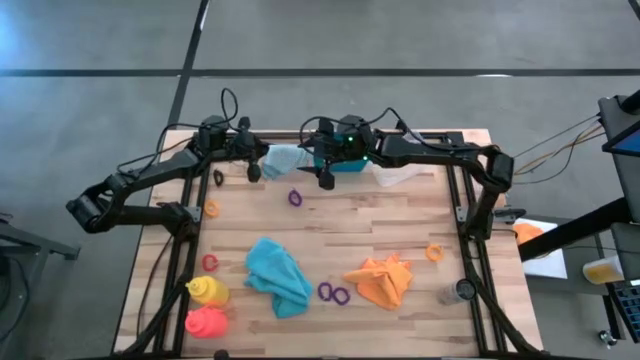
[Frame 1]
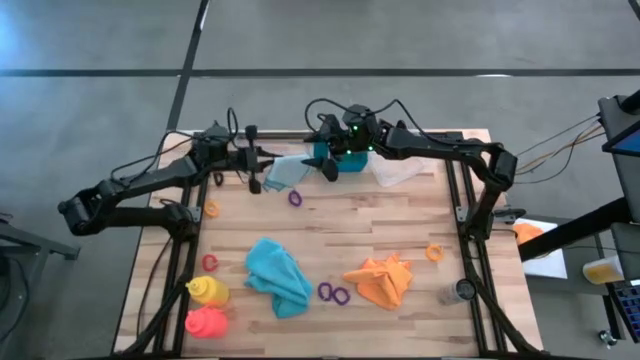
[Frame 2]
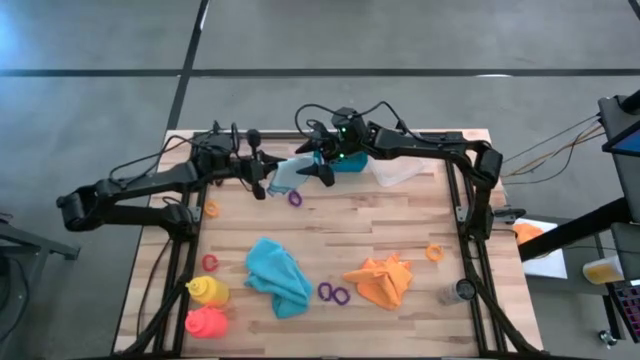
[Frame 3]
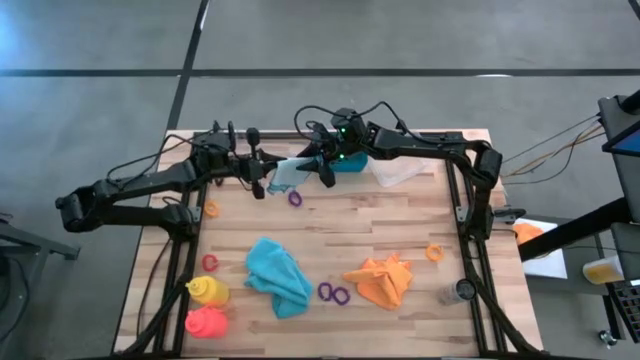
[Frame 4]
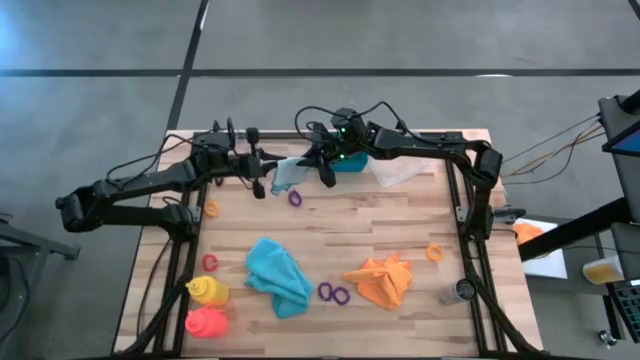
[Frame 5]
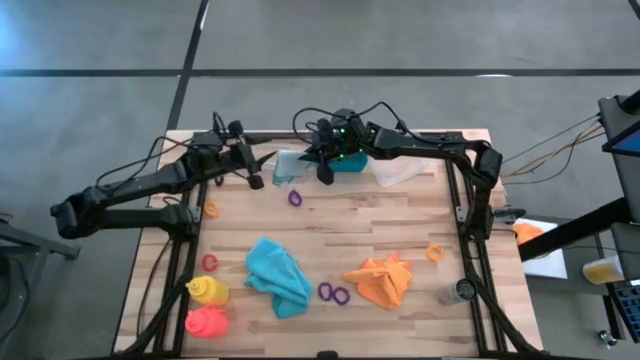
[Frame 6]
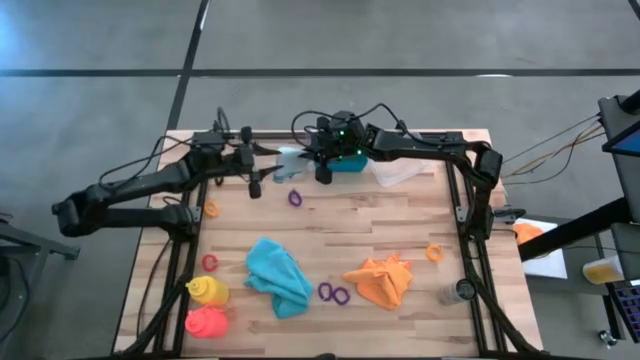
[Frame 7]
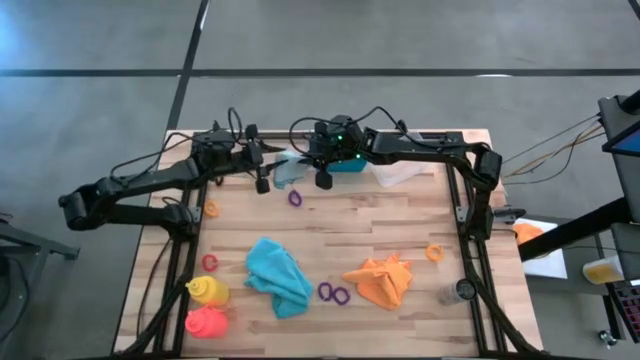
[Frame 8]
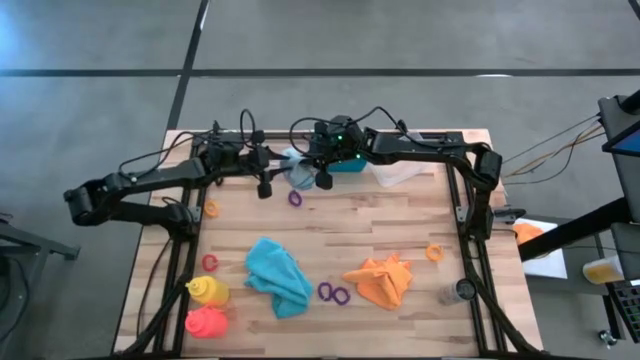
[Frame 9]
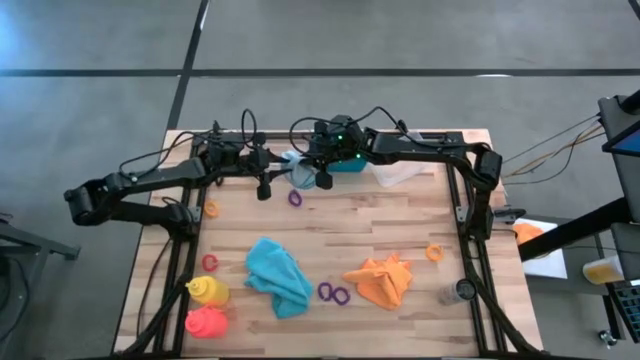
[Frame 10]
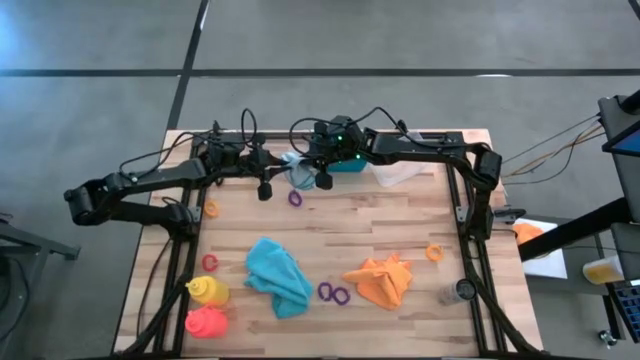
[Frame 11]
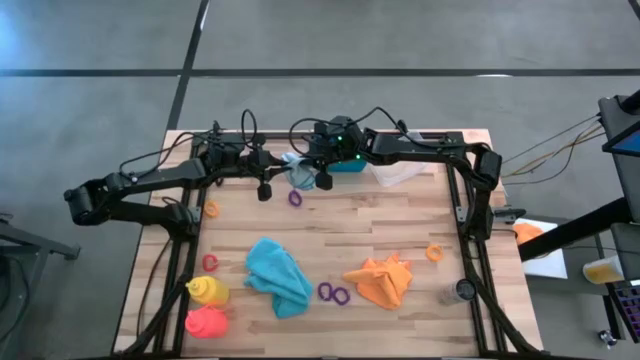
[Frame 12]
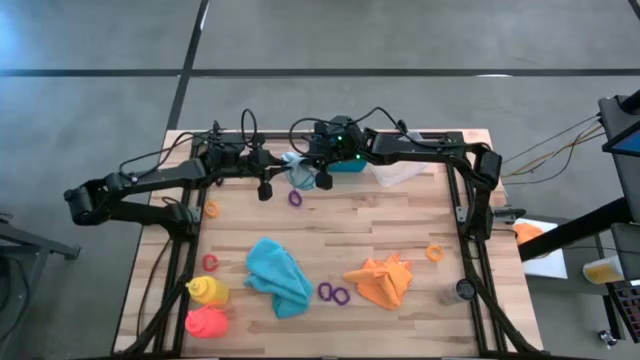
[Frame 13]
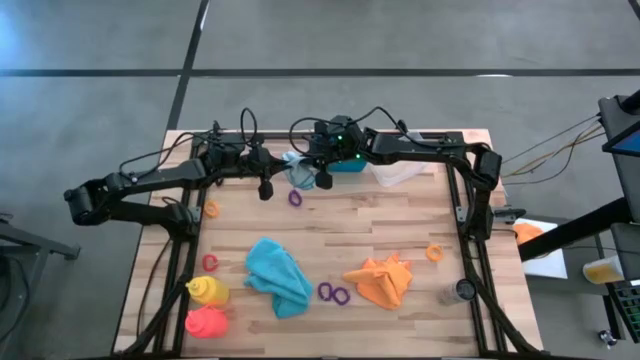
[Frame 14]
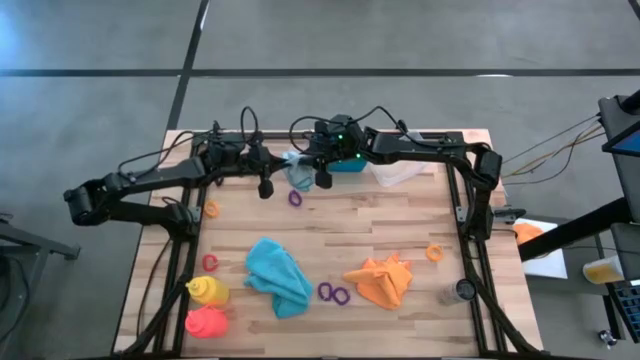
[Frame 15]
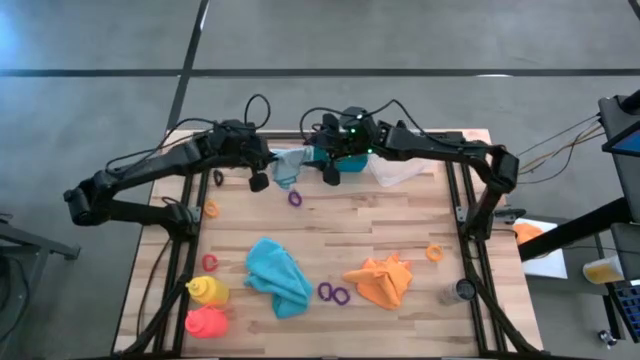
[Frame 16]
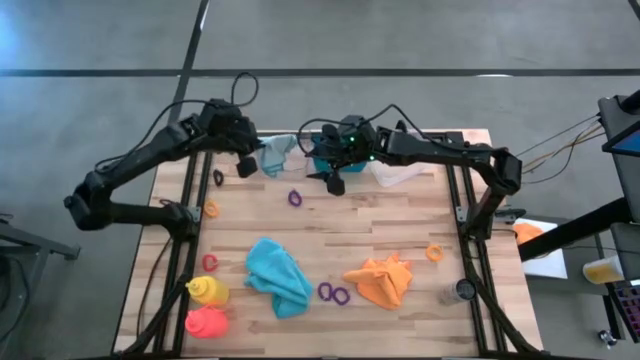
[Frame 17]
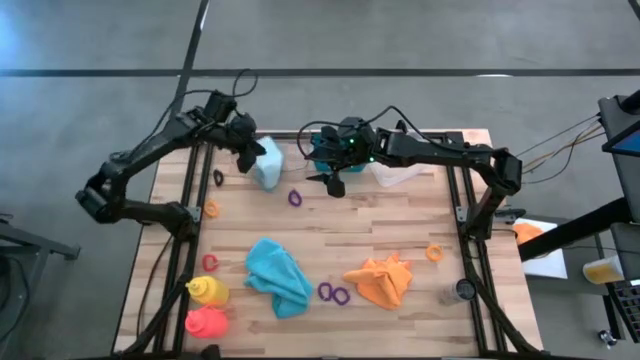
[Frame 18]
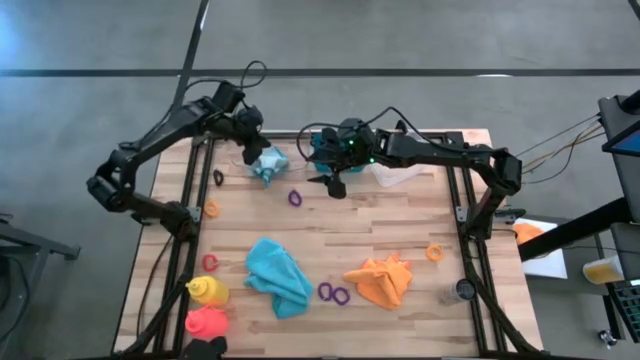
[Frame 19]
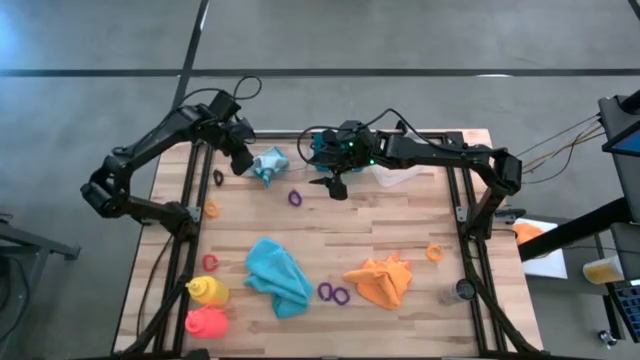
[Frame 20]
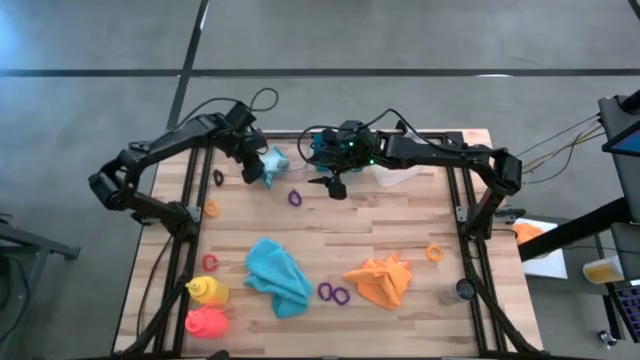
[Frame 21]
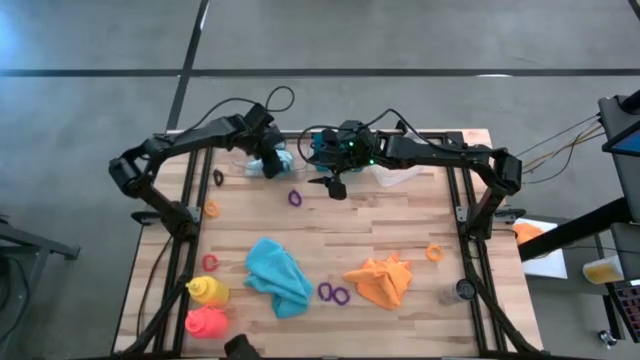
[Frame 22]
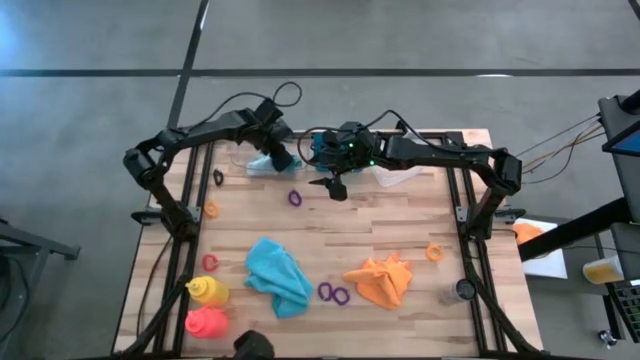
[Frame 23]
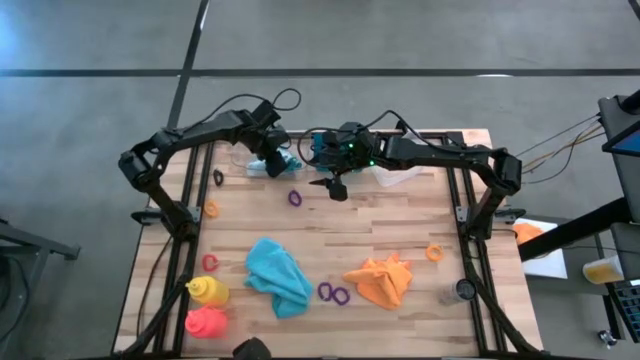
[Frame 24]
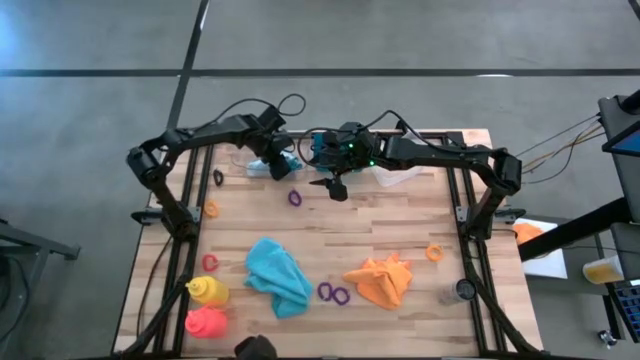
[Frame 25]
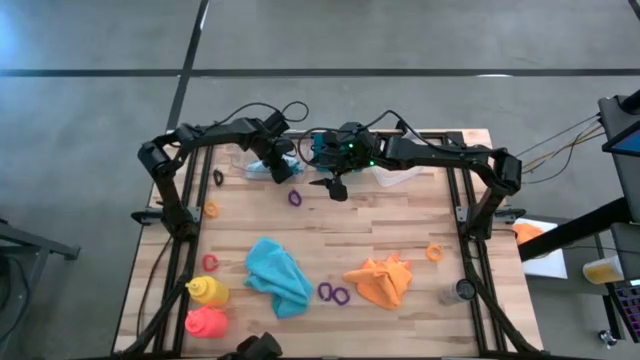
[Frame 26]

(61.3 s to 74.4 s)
Task: Pick & Place Sports Items
Put the folded light blue towel into the transparent bin

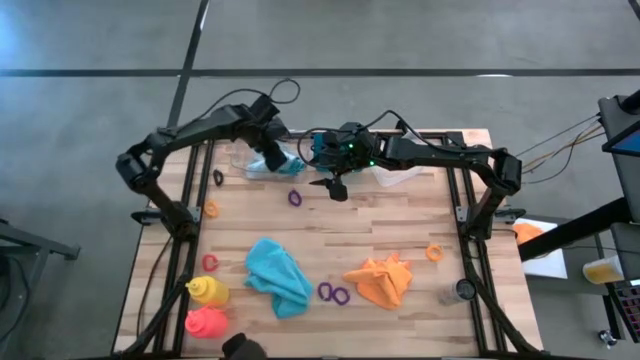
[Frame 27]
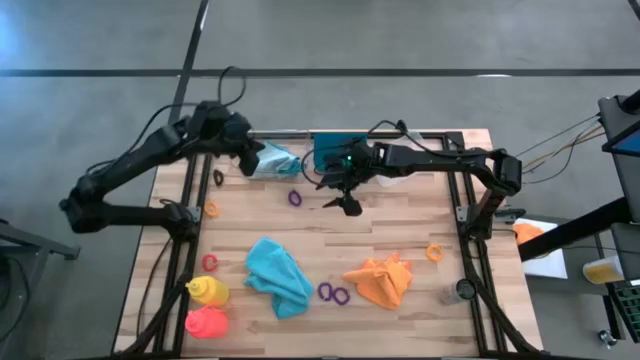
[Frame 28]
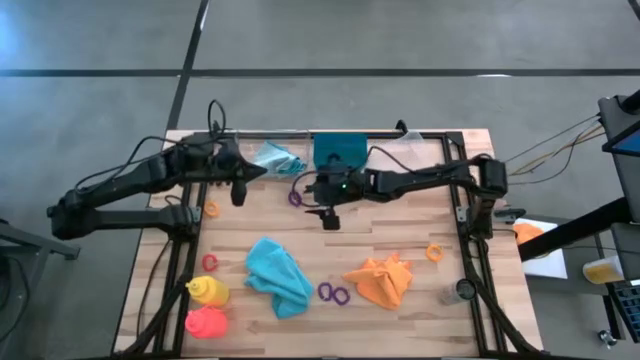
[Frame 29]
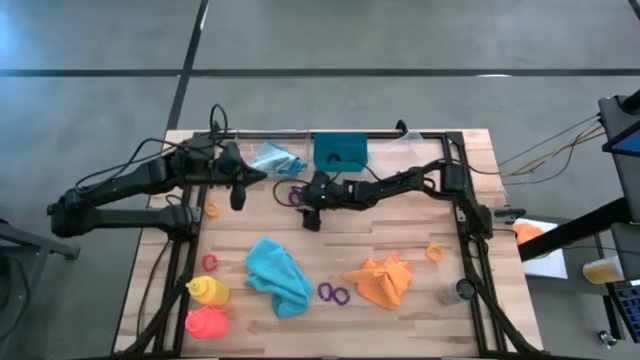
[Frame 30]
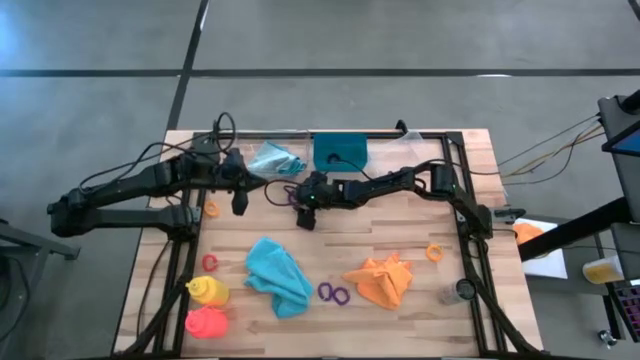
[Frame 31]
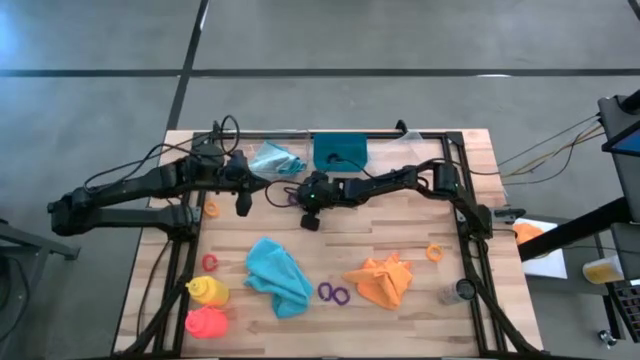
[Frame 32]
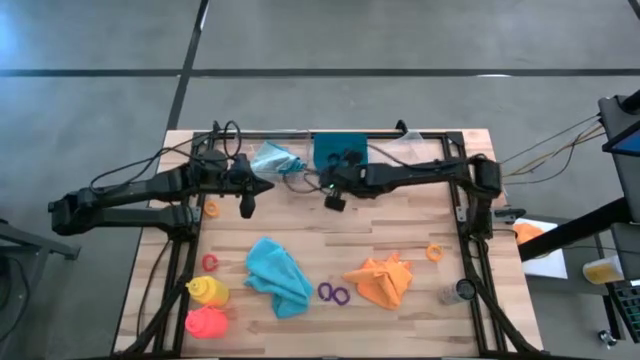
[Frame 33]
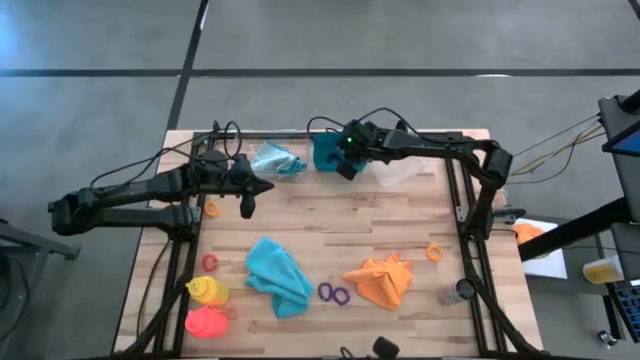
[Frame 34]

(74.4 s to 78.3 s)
Put the top right purple spring keychain into the blue bin

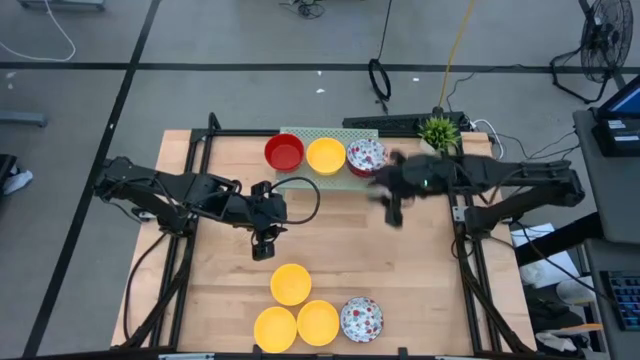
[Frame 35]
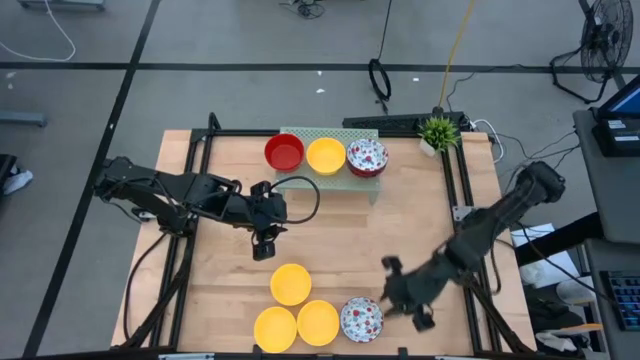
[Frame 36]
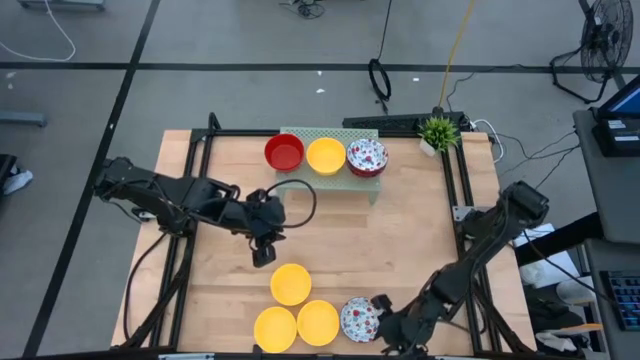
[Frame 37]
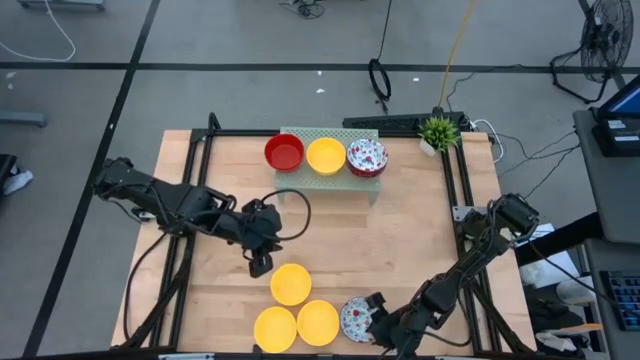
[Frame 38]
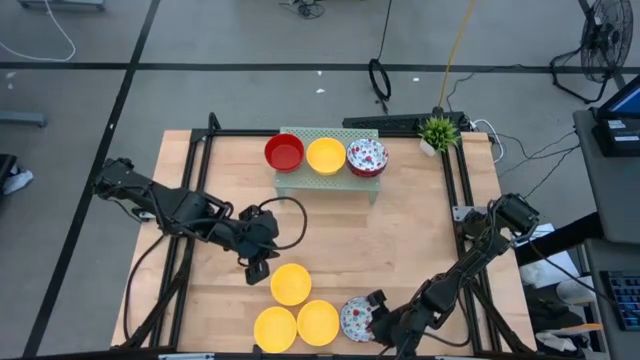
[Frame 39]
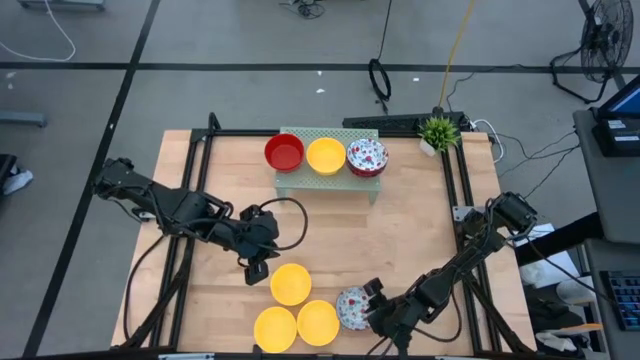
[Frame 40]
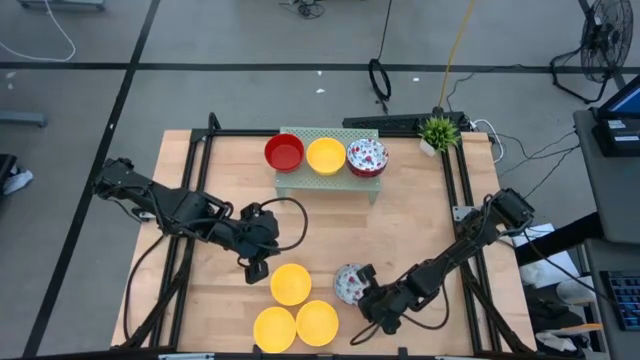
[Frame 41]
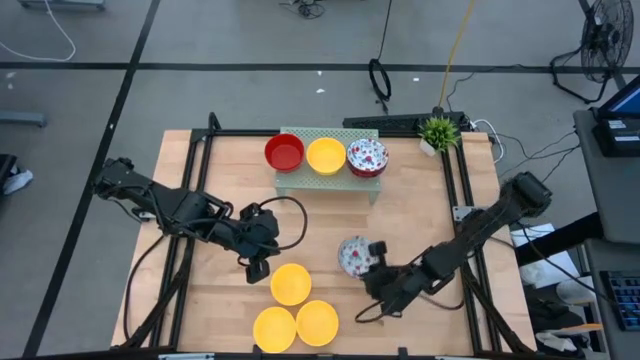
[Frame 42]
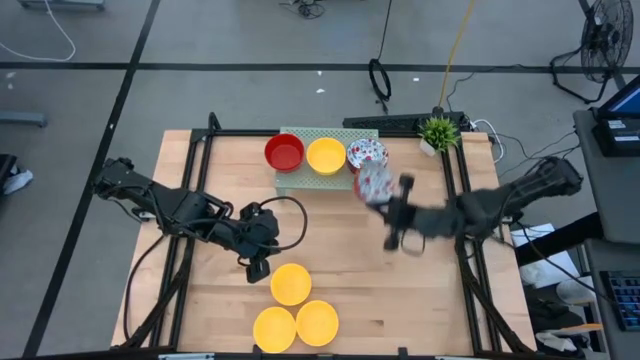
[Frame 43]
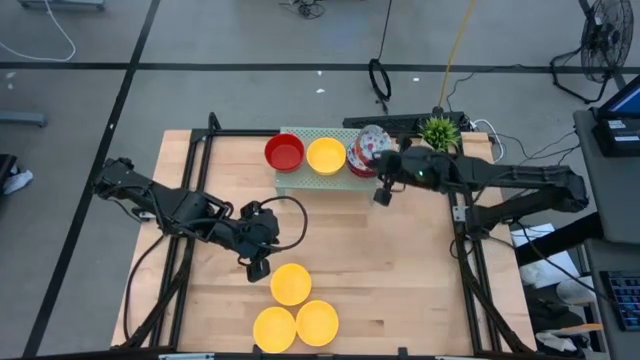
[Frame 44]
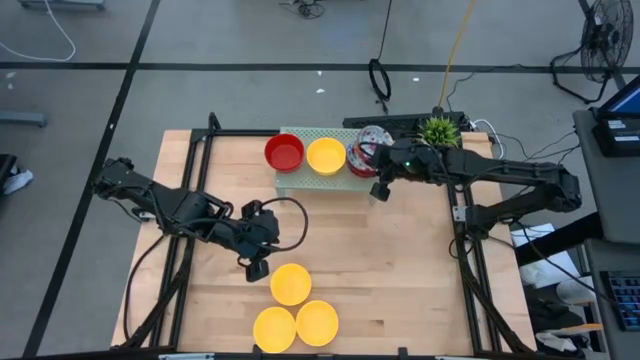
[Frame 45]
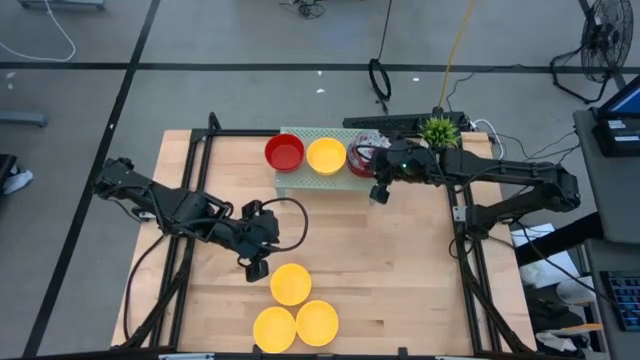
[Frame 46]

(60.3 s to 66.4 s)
Task: Pick & Place Mini bowls
Stack the white patterned bowl on the white patterned bowl on the shelf
